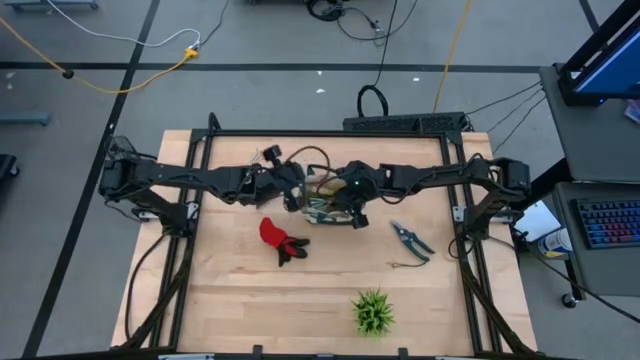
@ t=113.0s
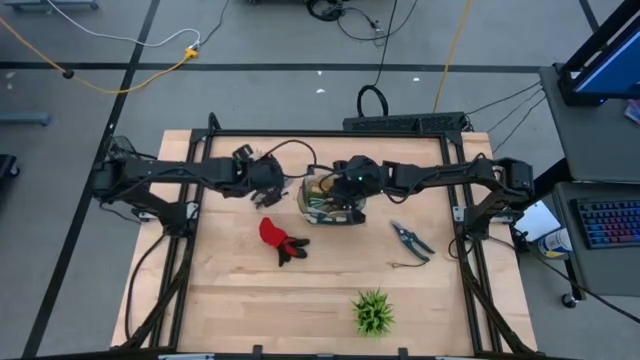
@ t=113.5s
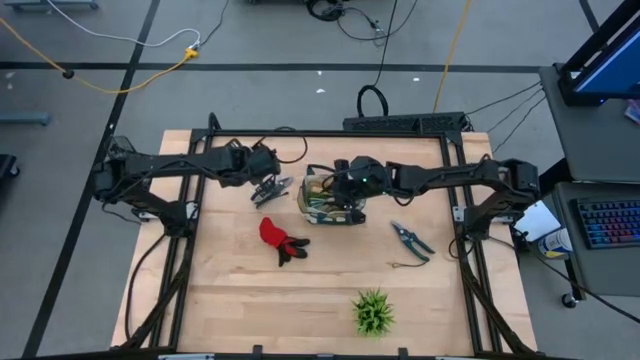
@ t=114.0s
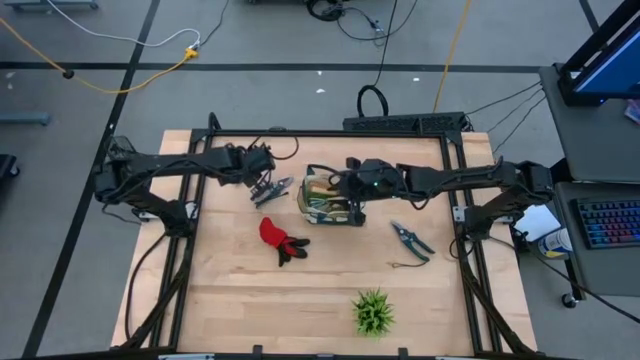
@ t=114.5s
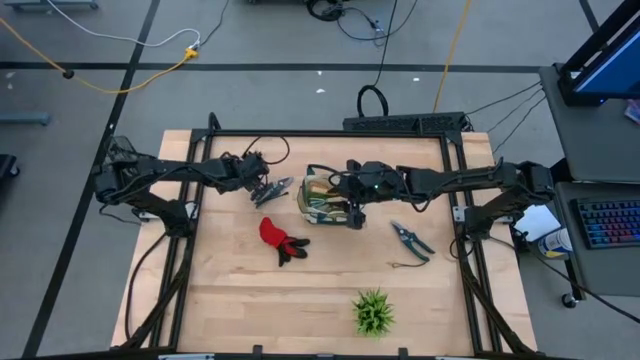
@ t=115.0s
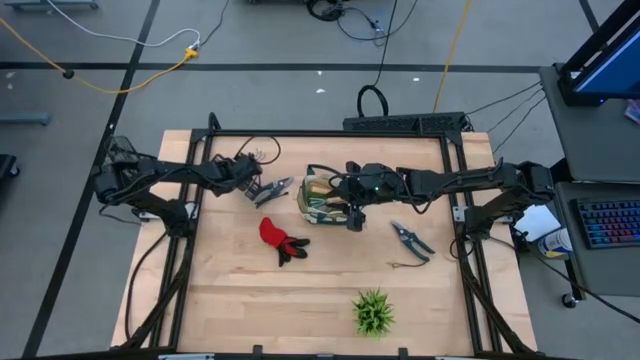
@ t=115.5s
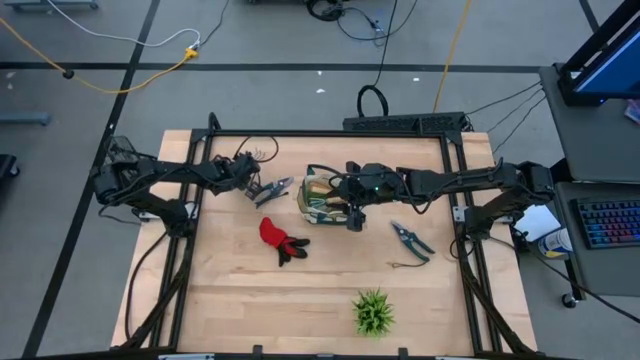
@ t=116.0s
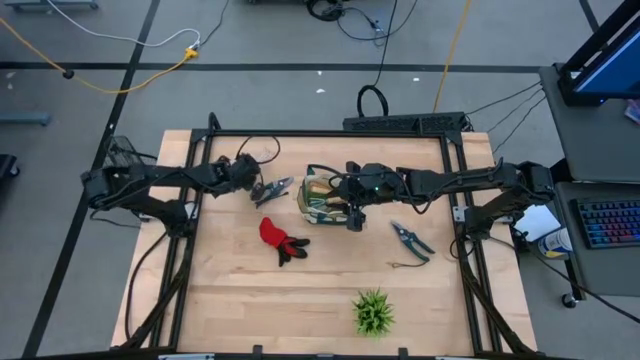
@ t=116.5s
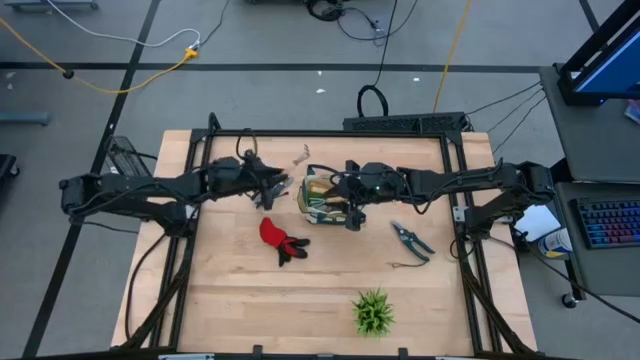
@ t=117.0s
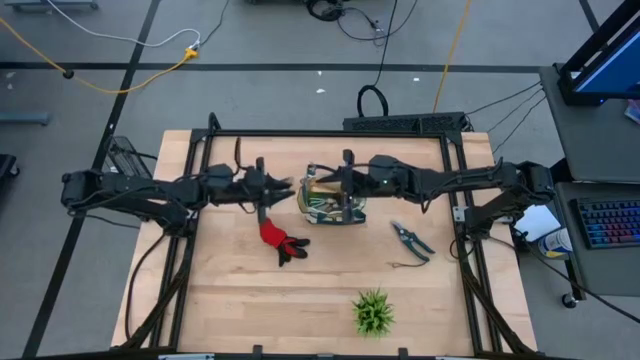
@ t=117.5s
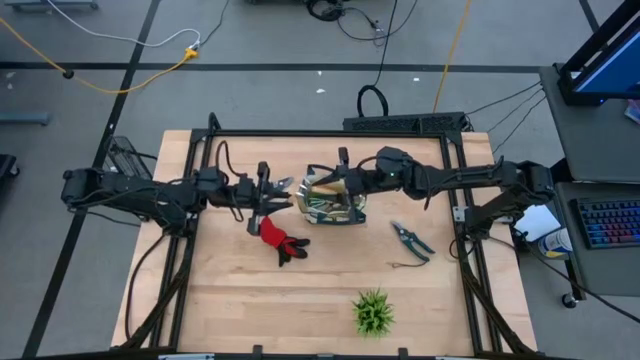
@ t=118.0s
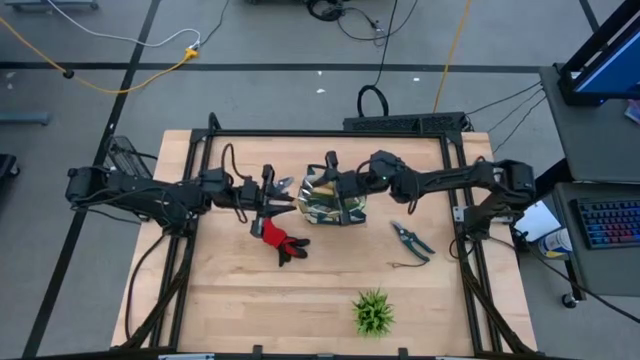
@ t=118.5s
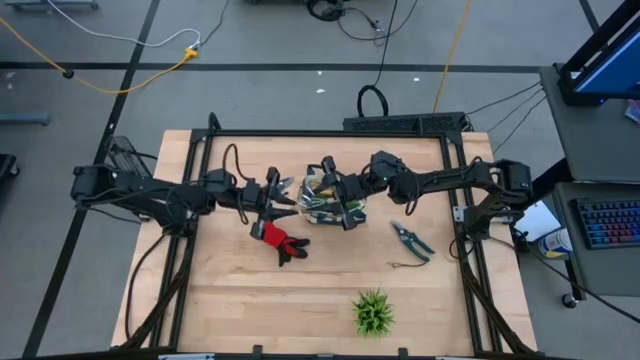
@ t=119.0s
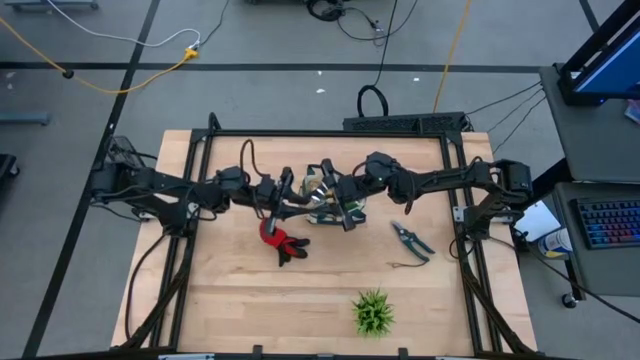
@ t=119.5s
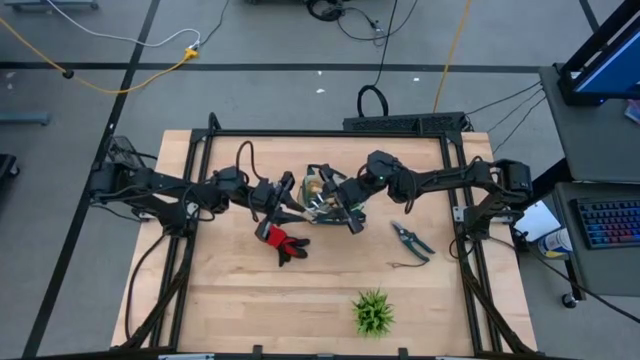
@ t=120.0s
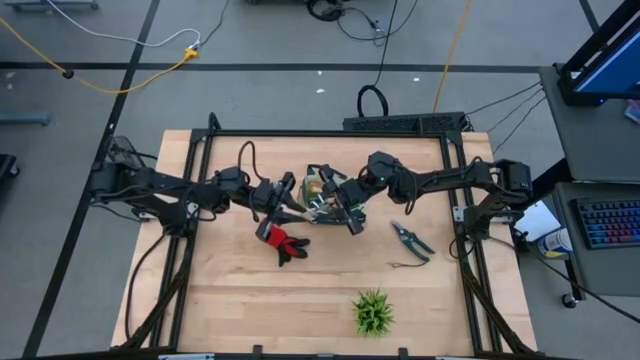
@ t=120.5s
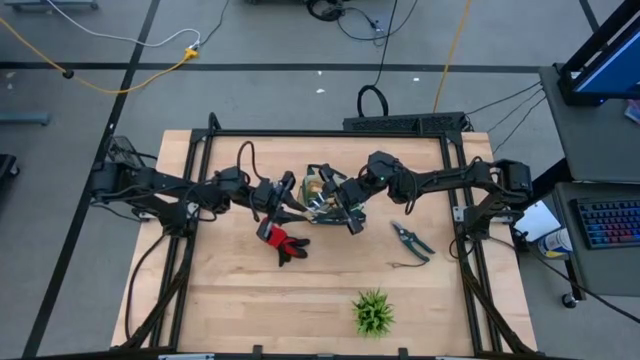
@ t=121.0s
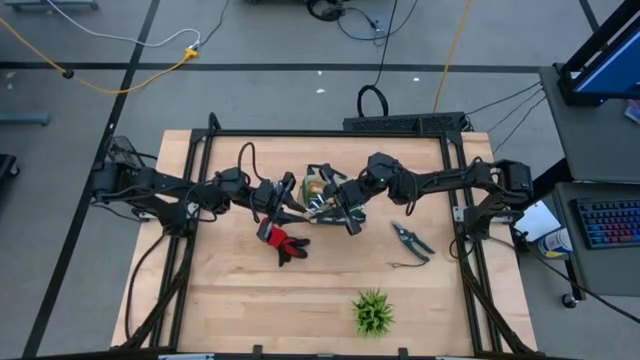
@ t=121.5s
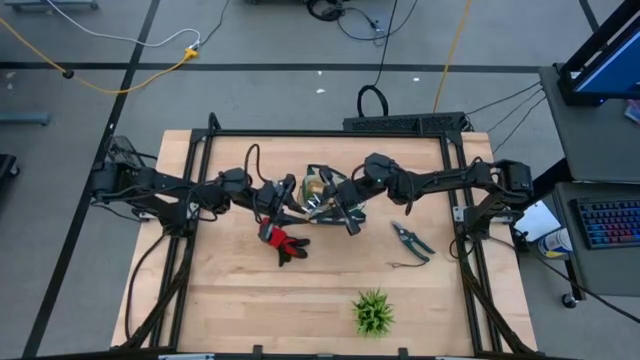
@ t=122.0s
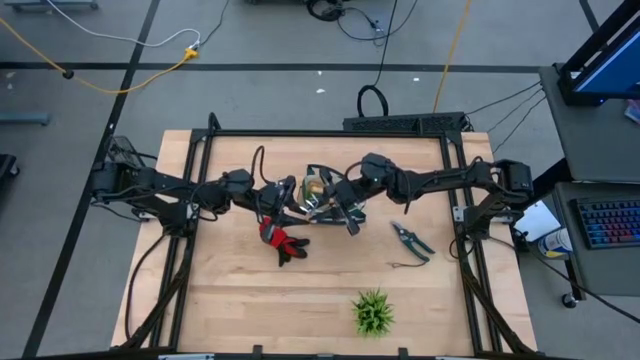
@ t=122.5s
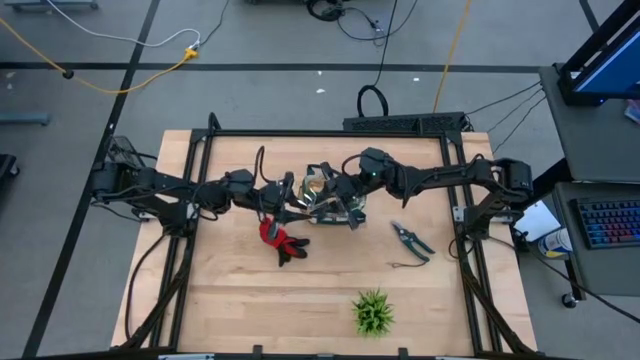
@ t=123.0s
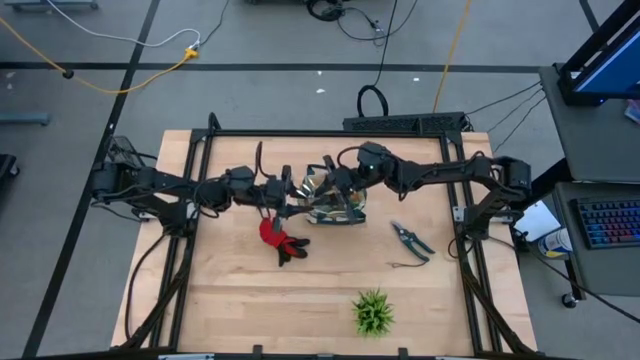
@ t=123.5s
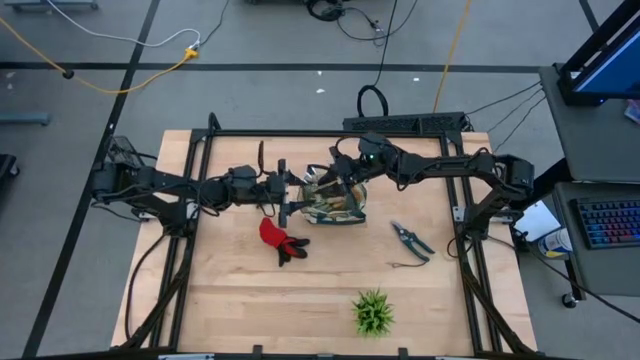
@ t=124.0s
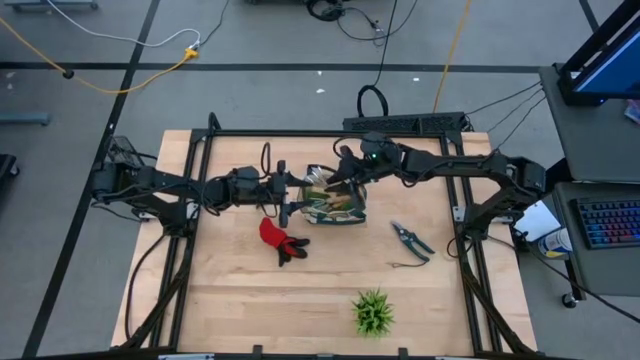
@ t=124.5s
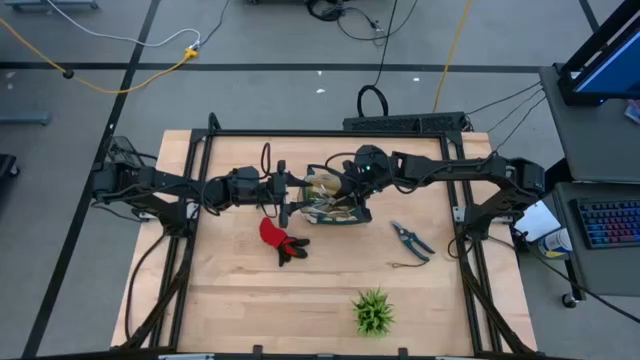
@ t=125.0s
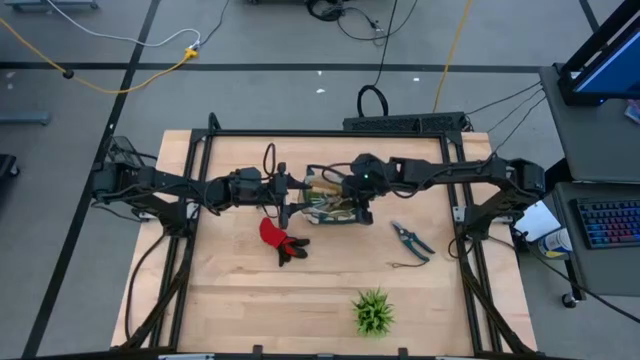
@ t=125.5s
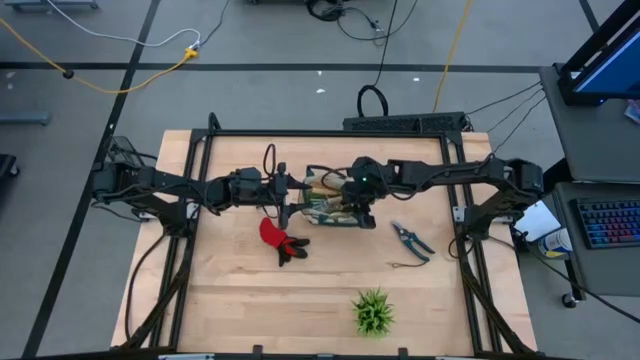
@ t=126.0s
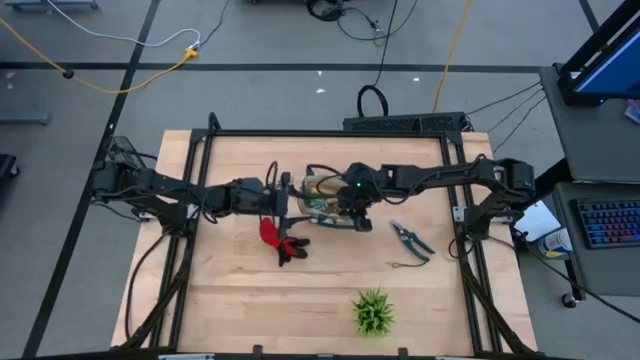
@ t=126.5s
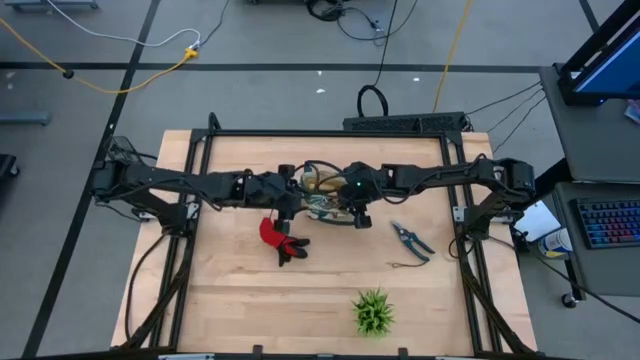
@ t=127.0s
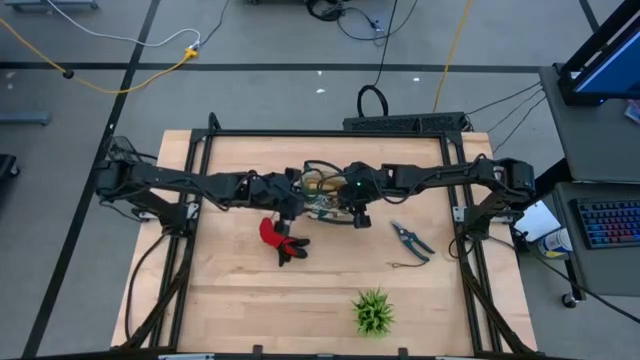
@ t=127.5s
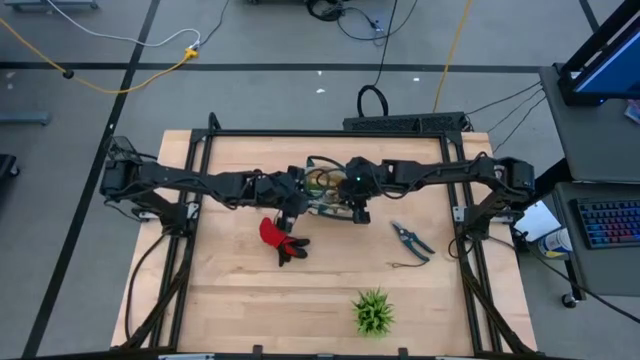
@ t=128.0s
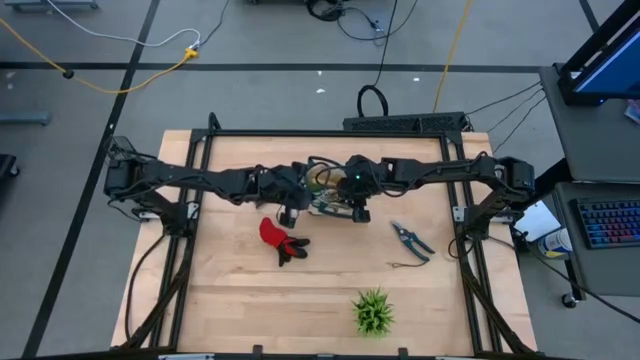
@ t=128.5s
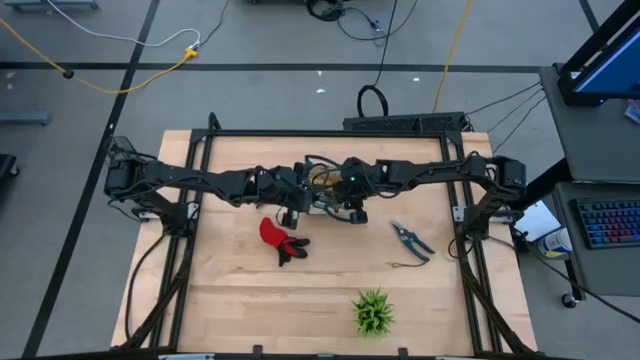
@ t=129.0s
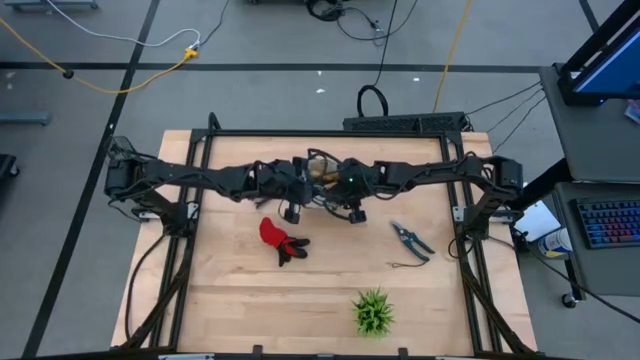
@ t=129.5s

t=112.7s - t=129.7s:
Task: Pick & Place Garden tools in Gardening bag
Put the brown hand rake into the gardening bag

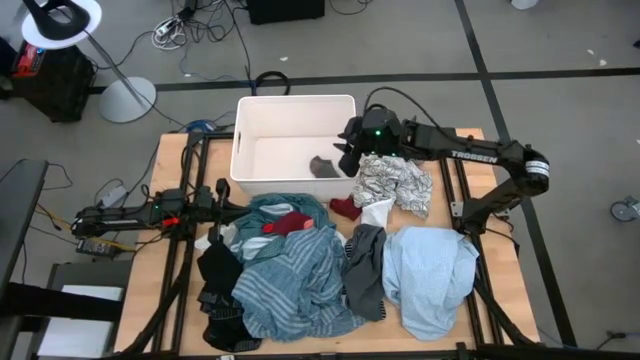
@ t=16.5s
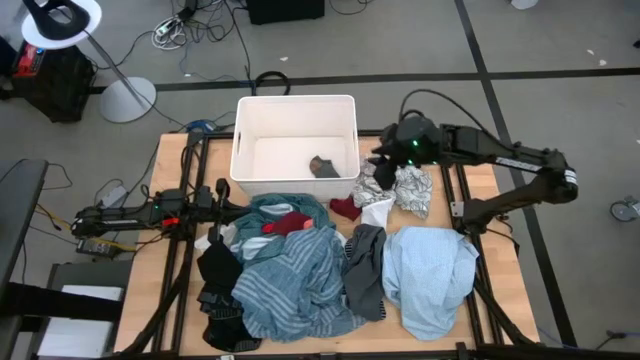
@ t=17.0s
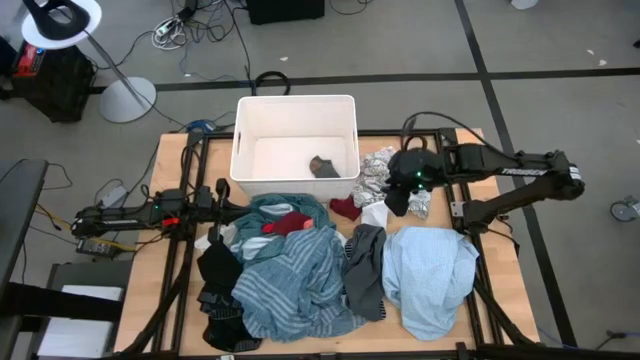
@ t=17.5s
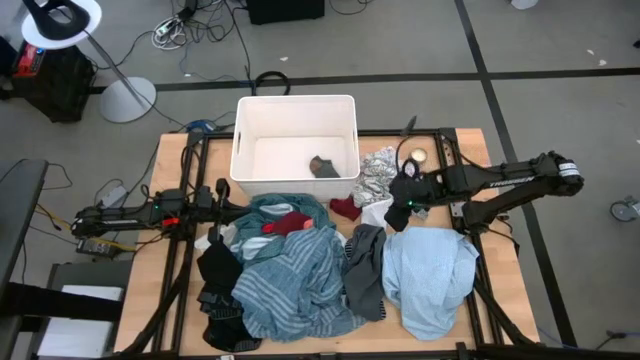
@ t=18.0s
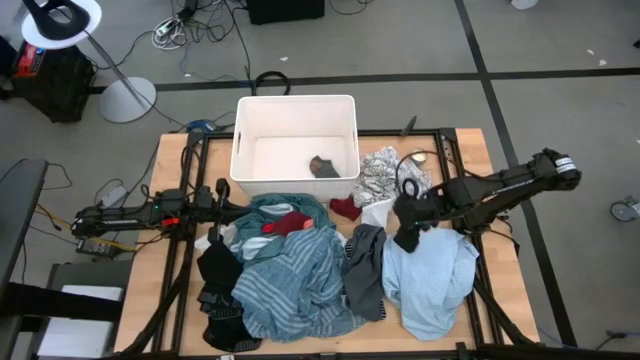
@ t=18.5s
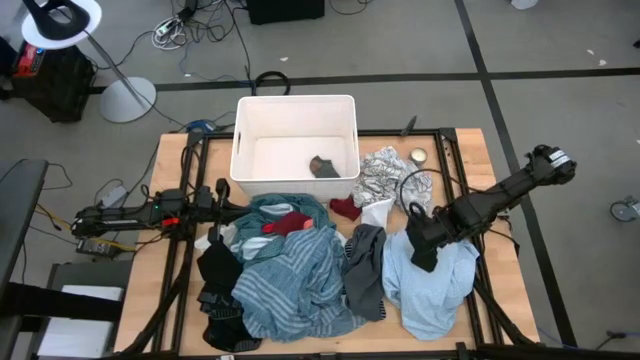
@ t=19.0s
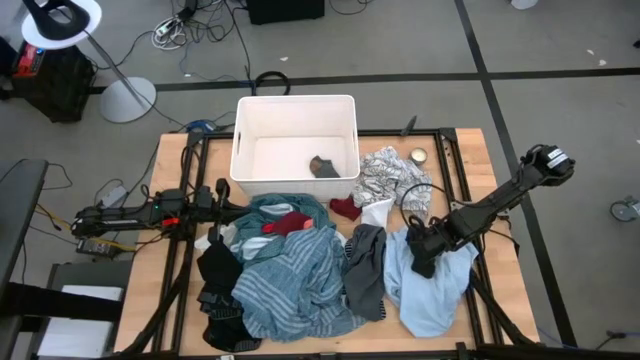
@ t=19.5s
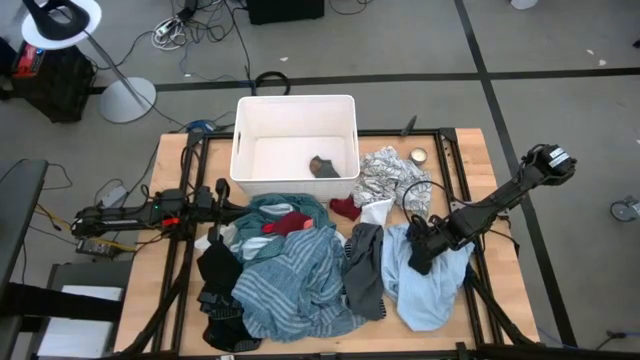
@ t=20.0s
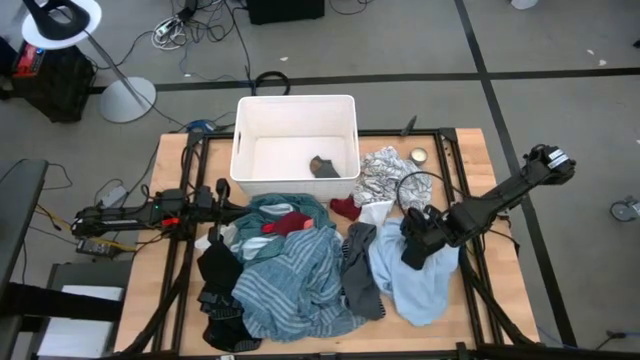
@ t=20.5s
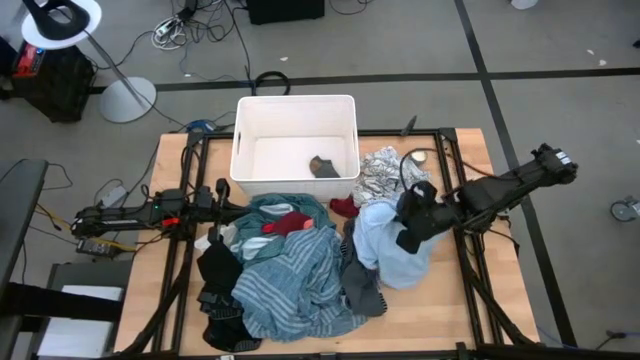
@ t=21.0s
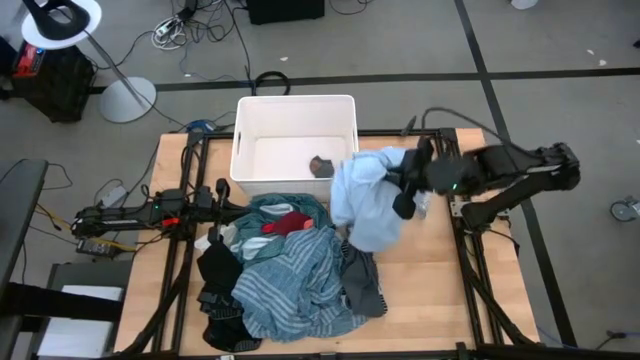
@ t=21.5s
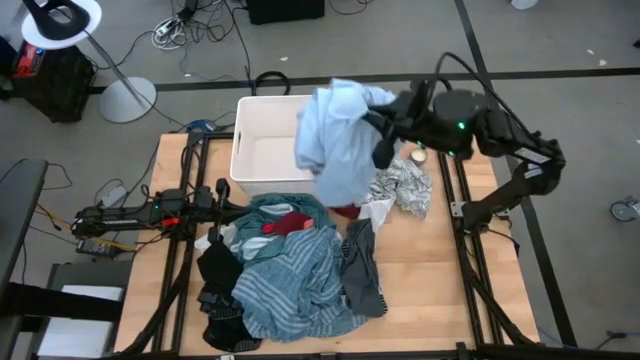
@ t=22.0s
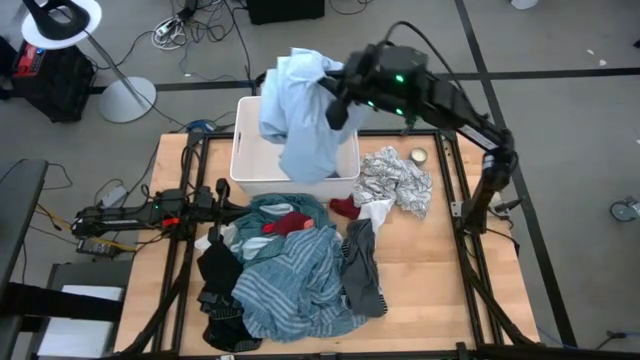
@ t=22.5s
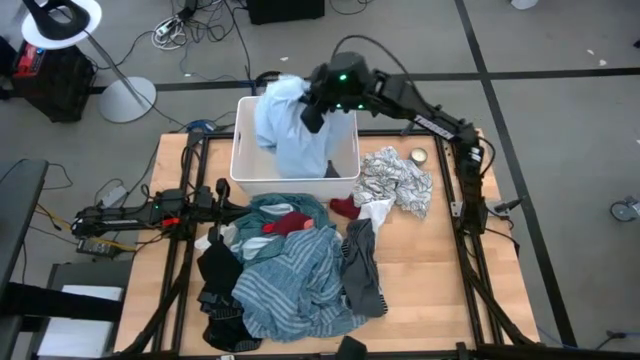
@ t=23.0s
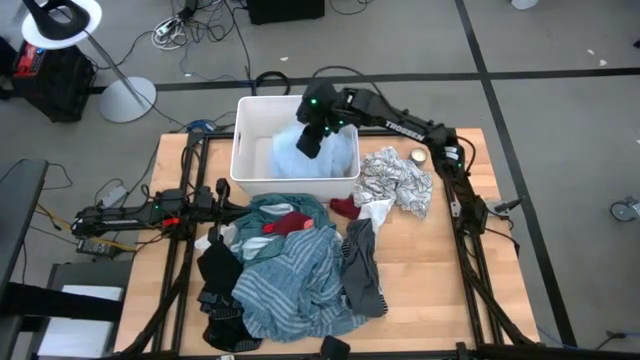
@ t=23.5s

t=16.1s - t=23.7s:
Task: Sort clothes
Put the blue patterned shirt into the white laundry bin
